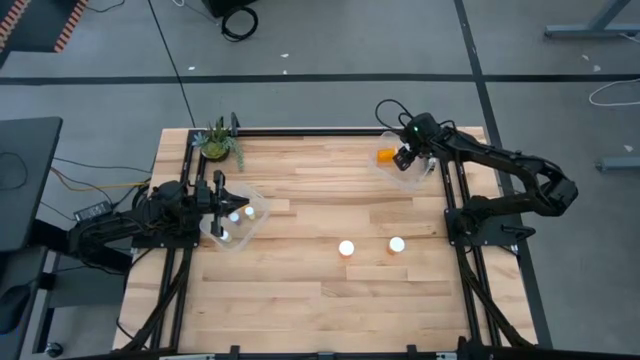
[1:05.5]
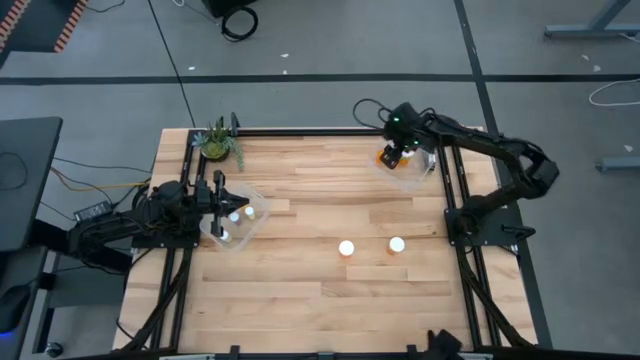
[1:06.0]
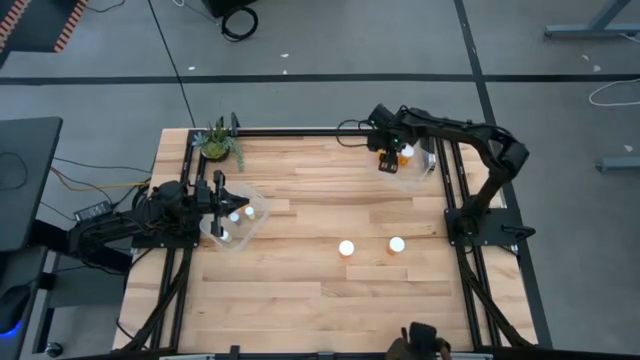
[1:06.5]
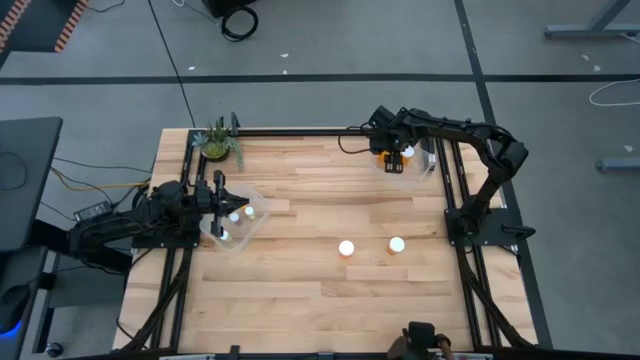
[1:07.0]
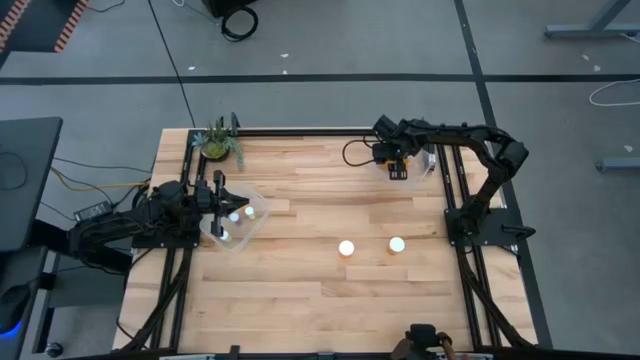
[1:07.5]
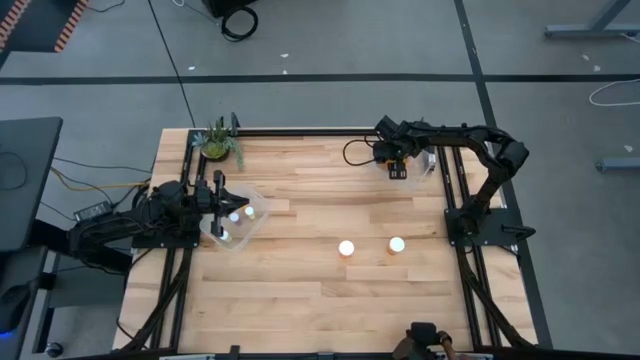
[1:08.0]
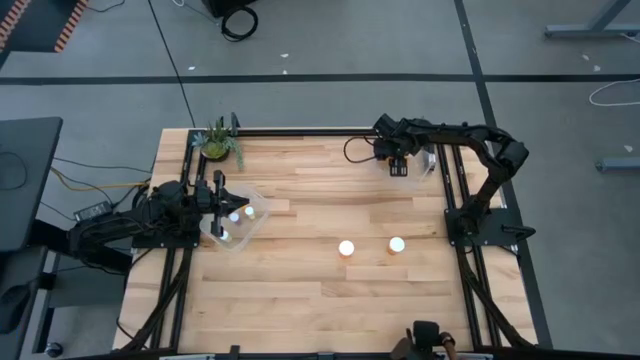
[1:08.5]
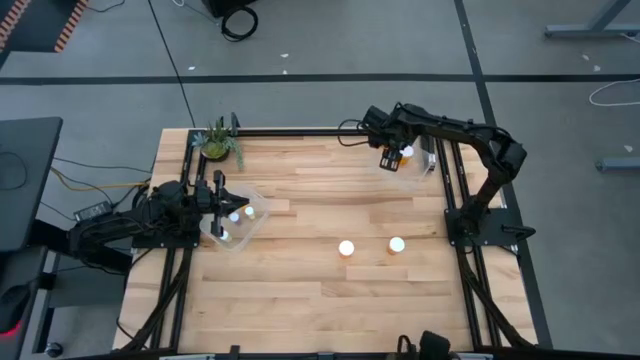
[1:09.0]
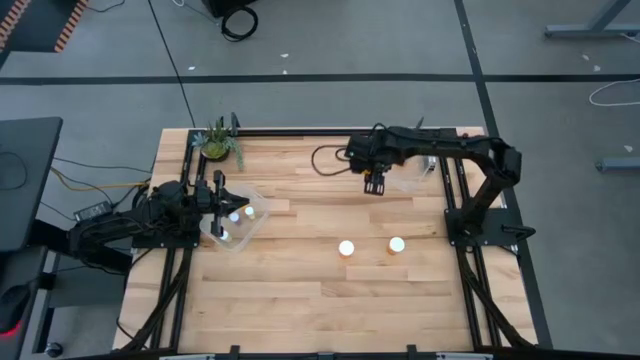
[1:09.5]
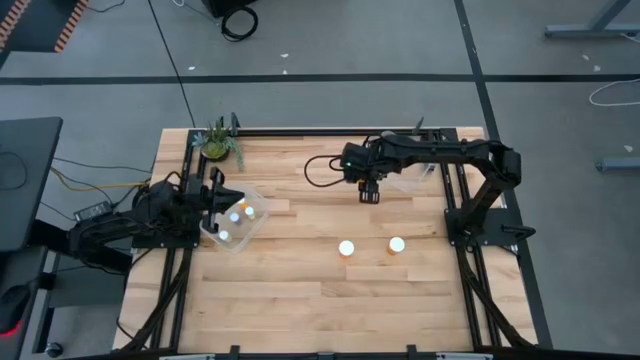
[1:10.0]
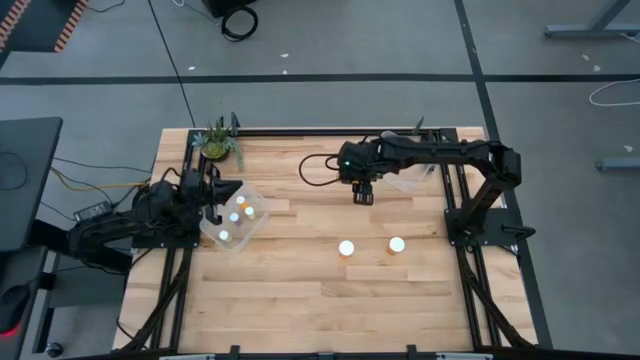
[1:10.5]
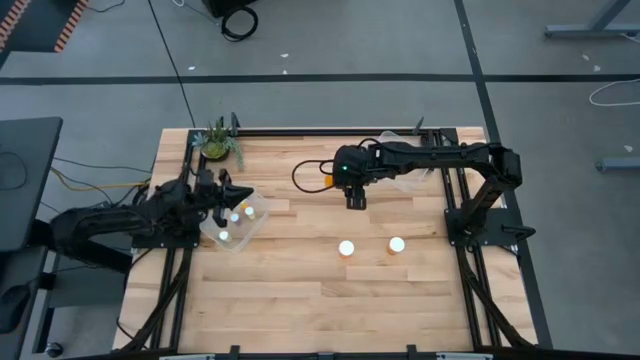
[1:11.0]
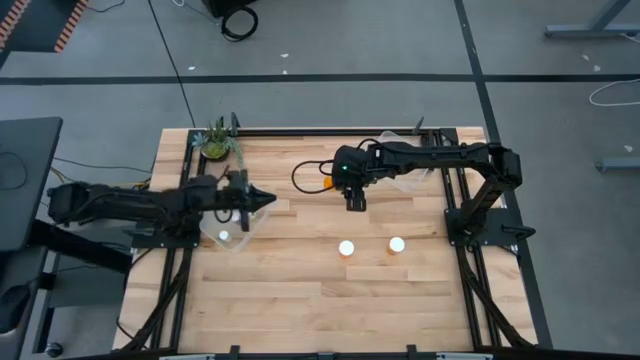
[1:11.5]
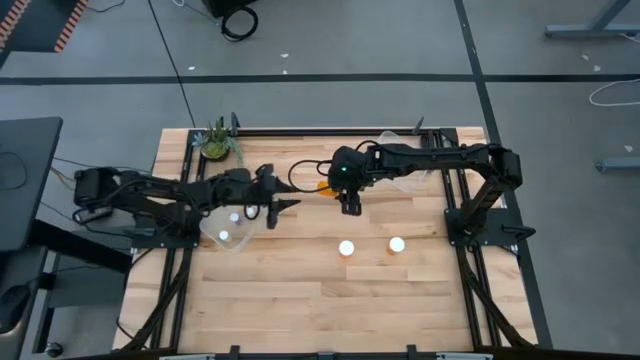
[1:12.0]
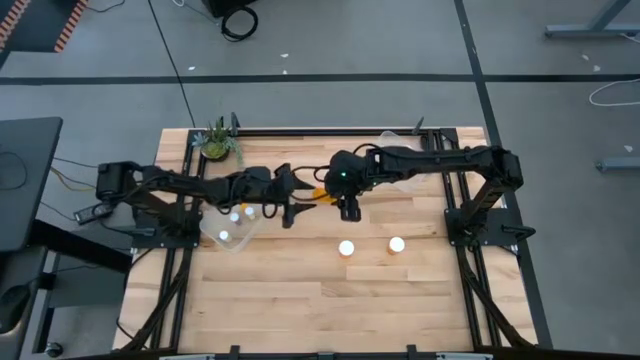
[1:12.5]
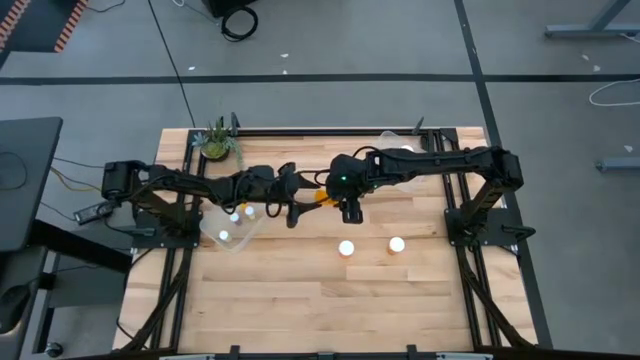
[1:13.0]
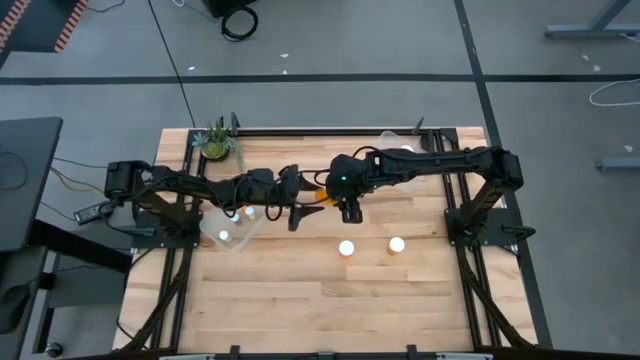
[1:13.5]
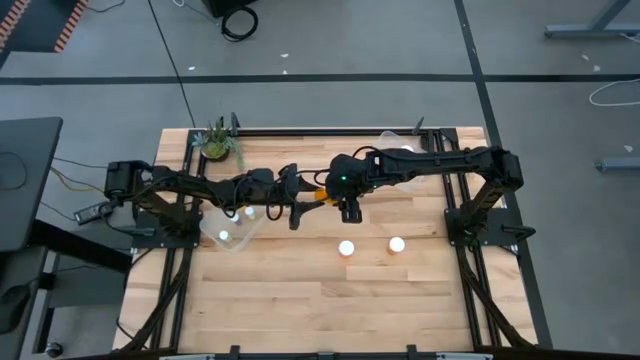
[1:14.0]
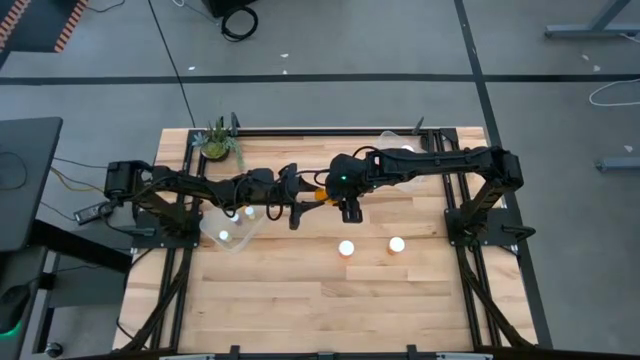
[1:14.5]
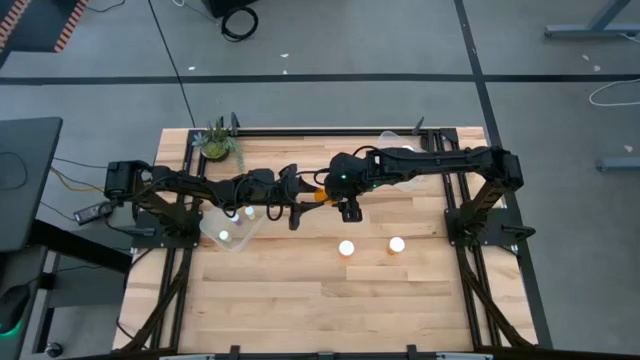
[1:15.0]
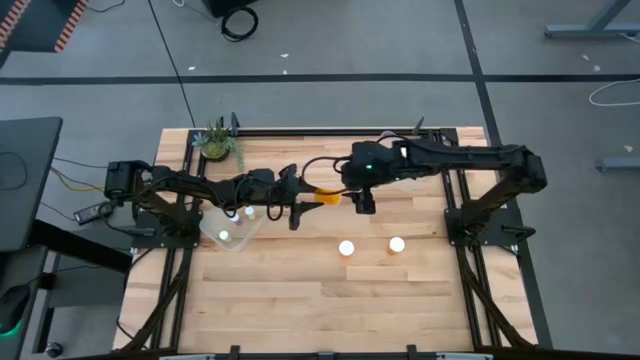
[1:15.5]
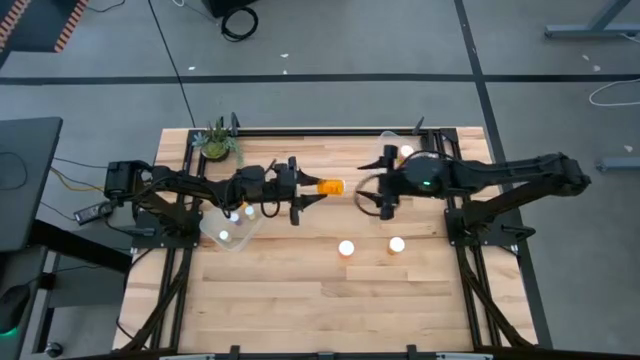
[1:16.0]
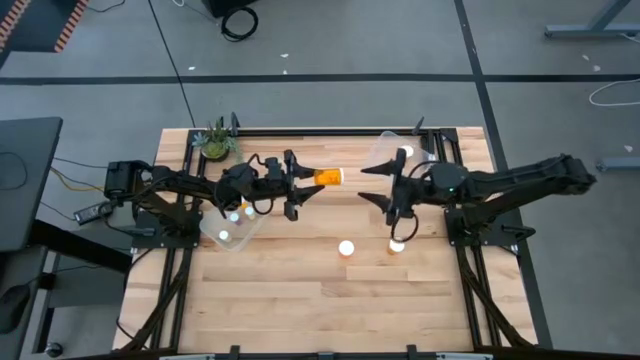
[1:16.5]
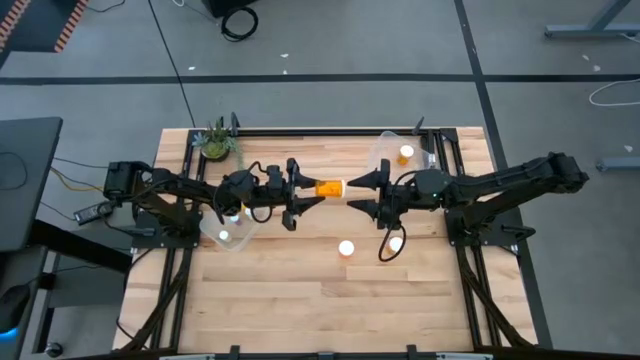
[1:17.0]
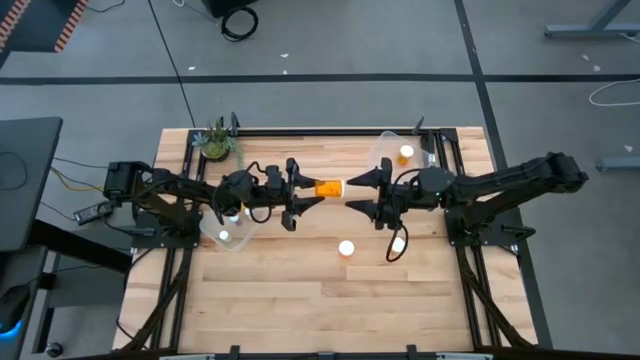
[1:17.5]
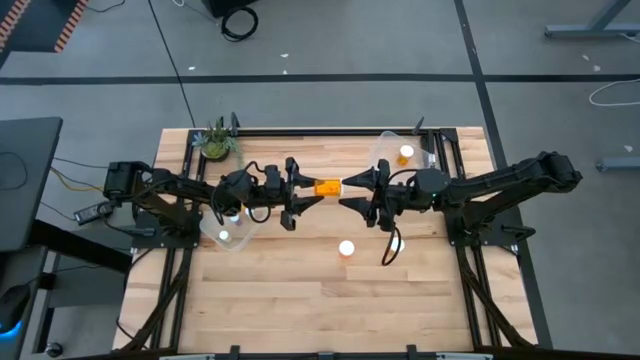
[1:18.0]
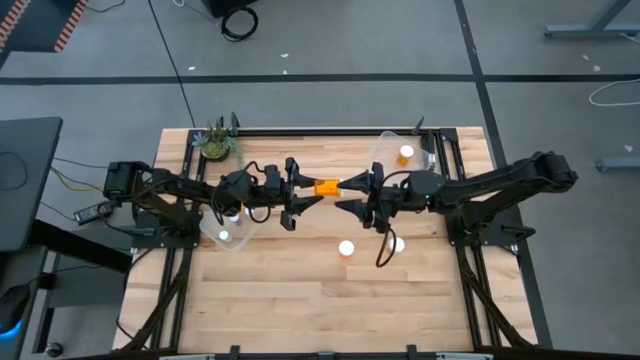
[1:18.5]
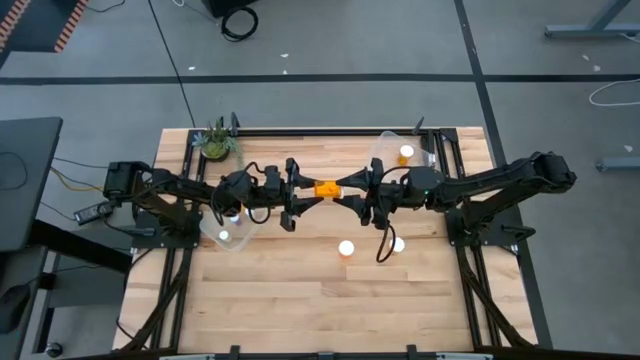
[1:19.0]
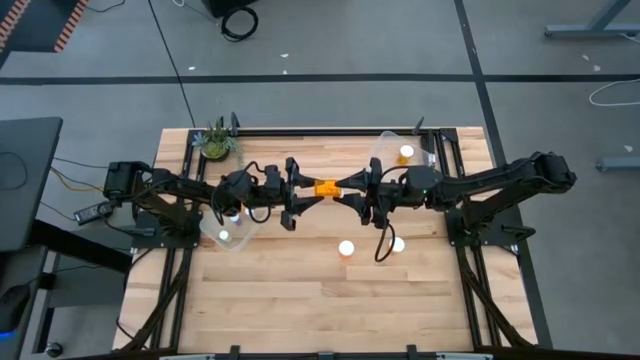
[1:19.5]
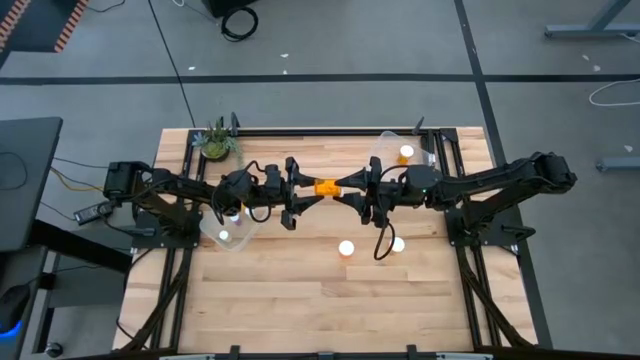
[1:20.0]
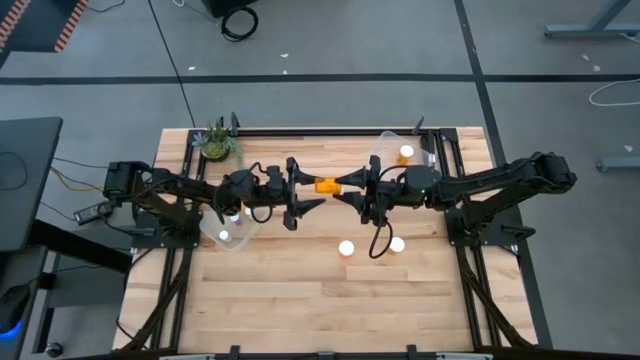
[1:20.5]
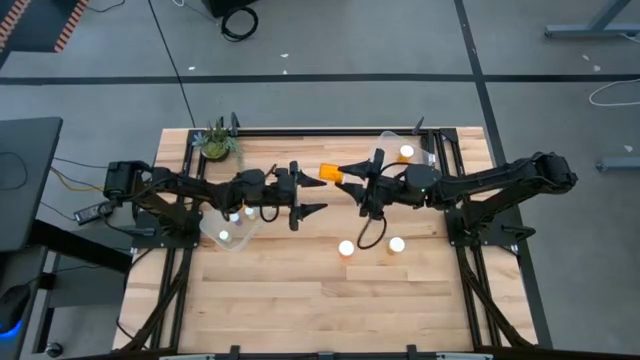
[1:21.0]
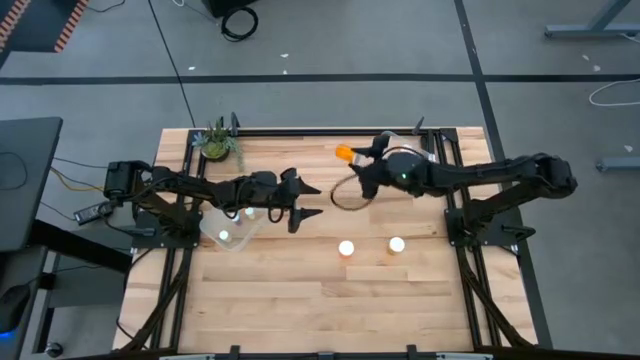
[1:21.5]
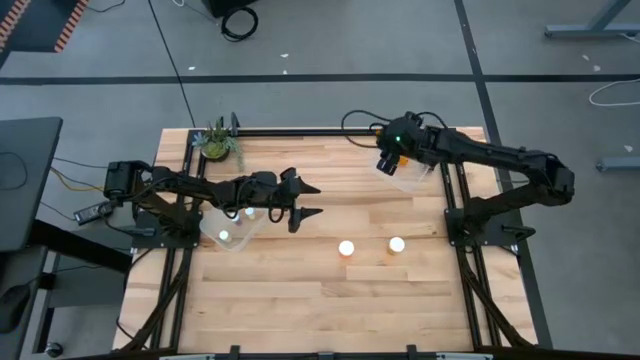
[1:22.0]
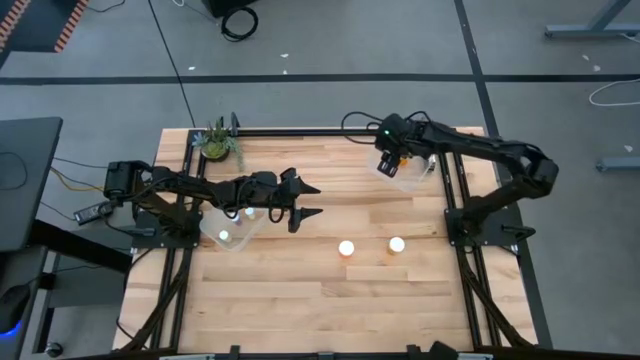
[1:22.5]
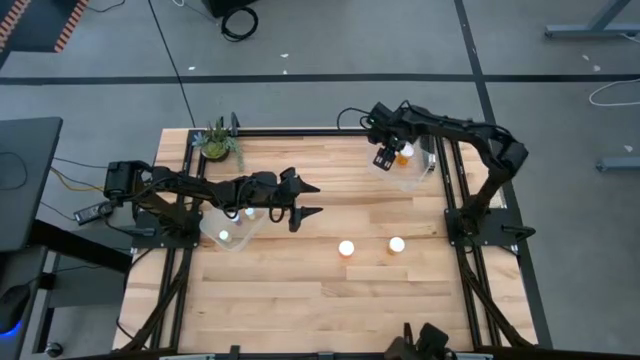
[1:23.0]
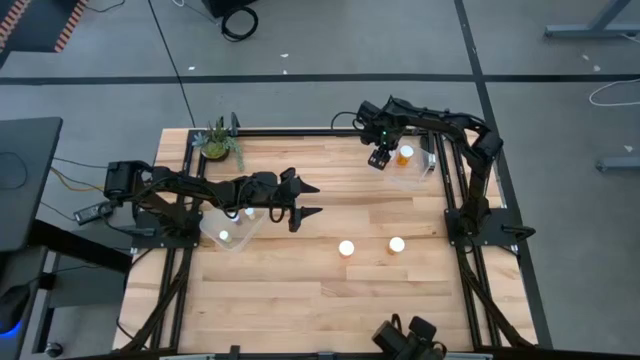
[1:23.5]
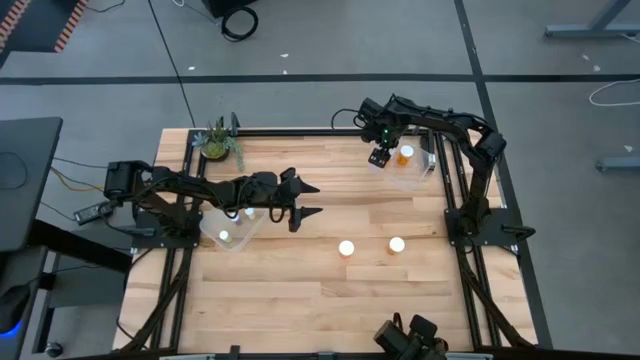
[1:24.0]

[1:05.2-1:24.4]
Task: Pick and place medicine bottles into bin by pill shape (circle, oval)
Adjust the large orange pill bottle in the right transparent bin

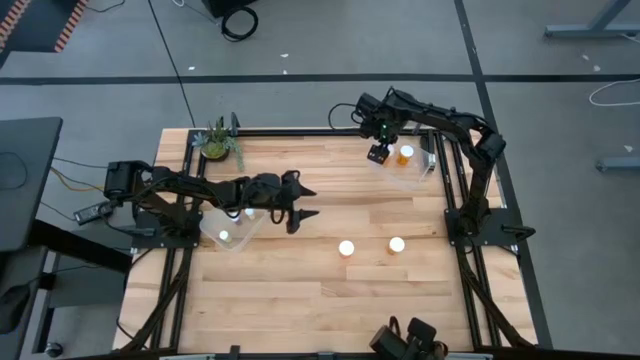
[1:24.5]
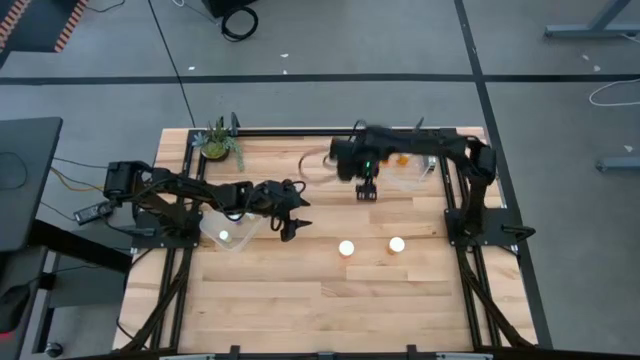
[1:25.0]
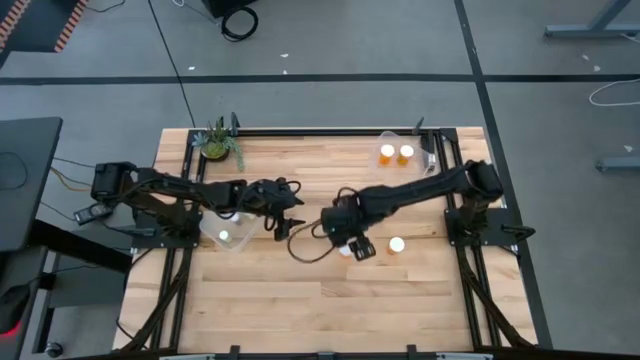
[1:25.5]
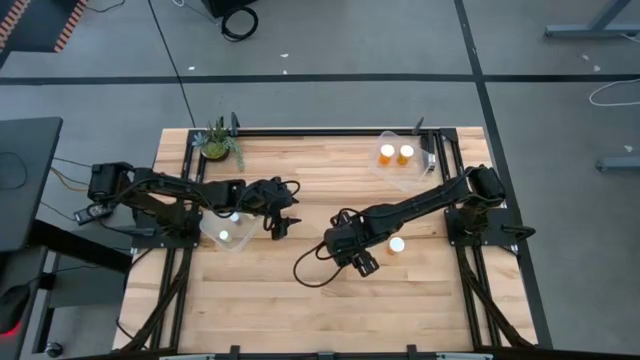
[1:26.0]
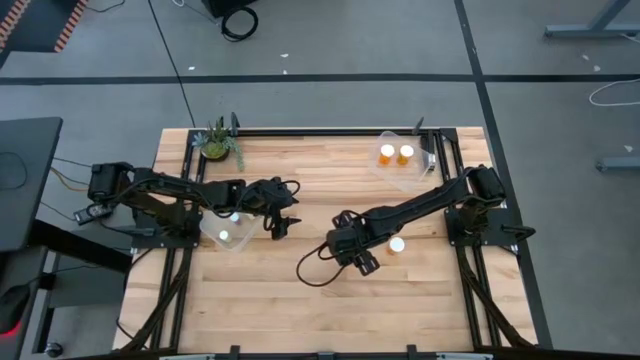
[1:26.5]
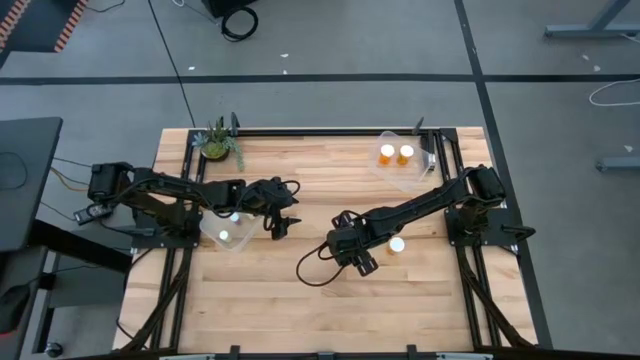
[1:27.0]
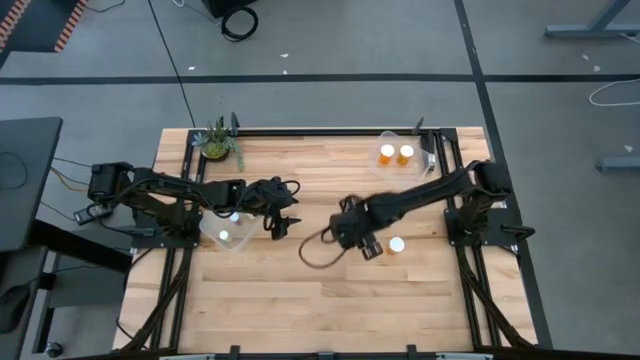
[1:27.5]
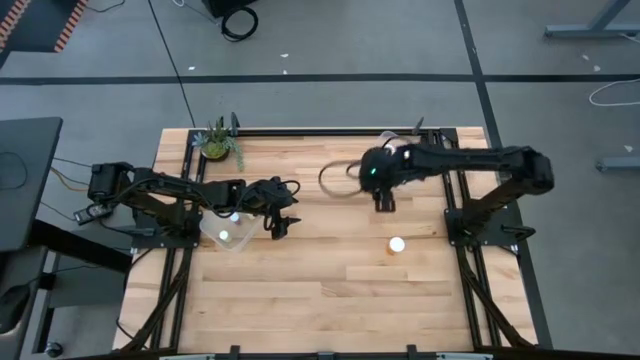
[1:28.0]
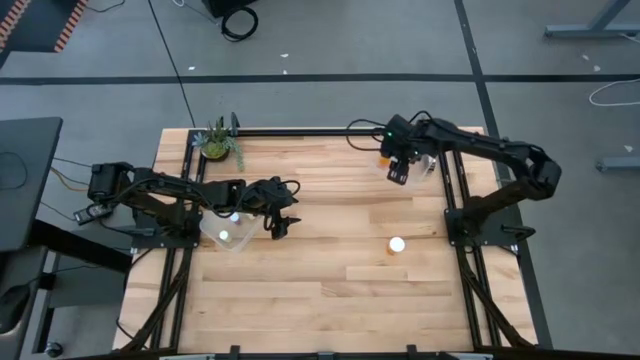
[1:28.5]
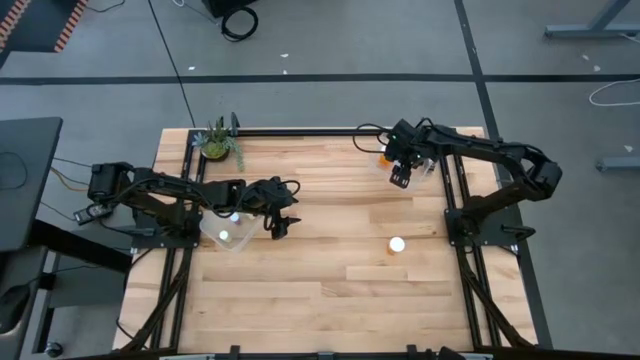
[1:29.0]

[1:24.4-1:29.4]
Put the orange pill bottle into the right transparent bin
